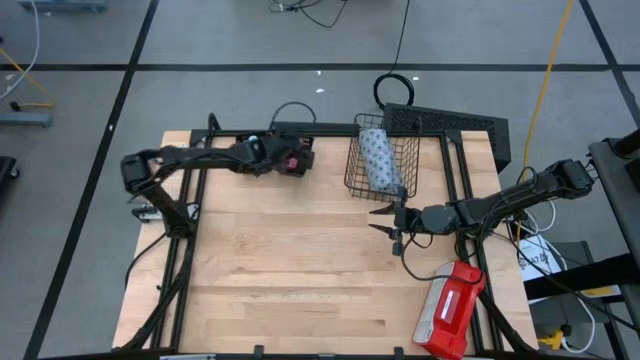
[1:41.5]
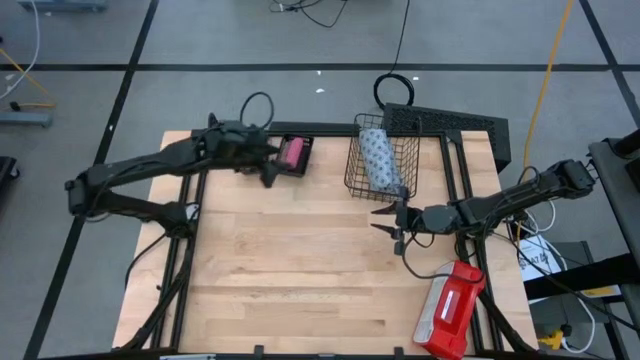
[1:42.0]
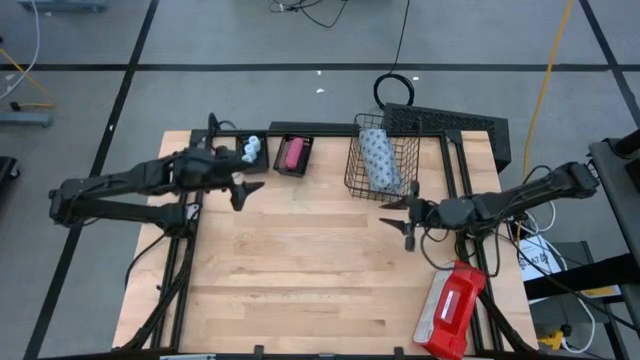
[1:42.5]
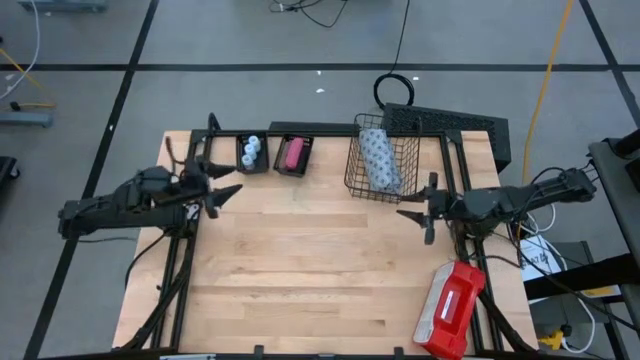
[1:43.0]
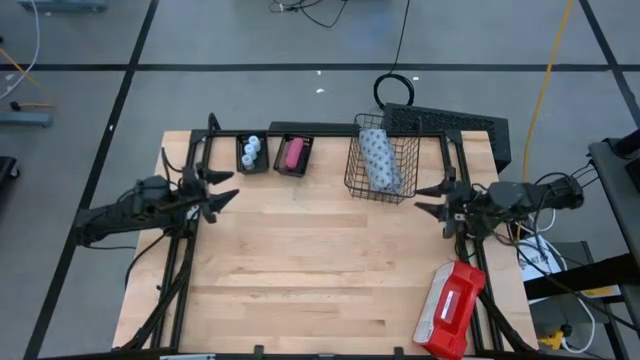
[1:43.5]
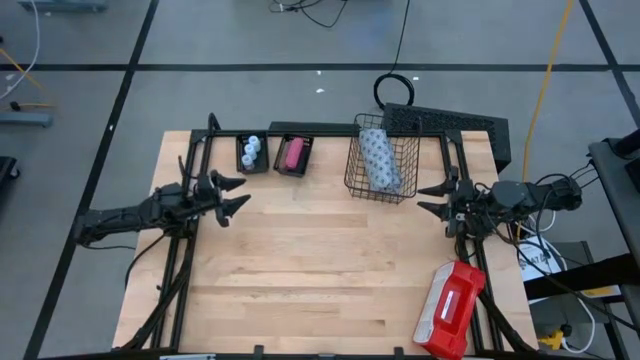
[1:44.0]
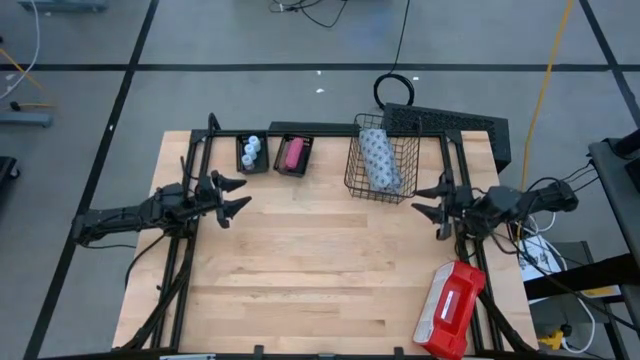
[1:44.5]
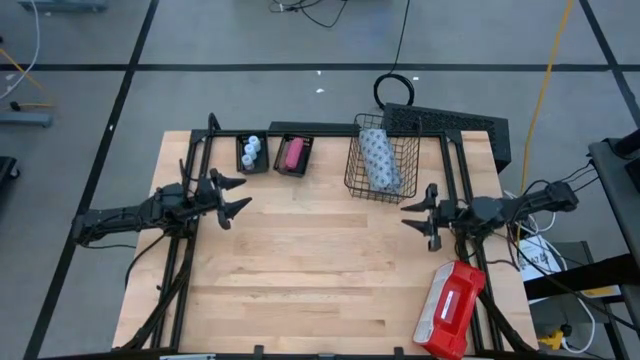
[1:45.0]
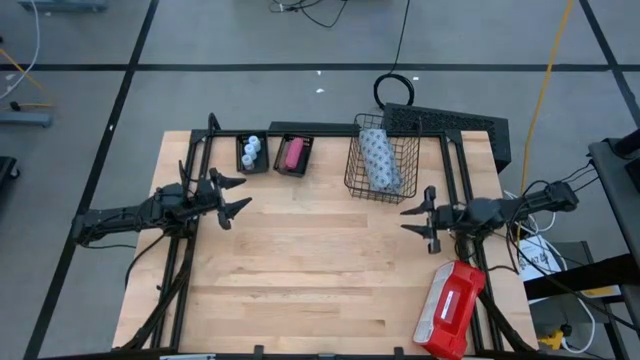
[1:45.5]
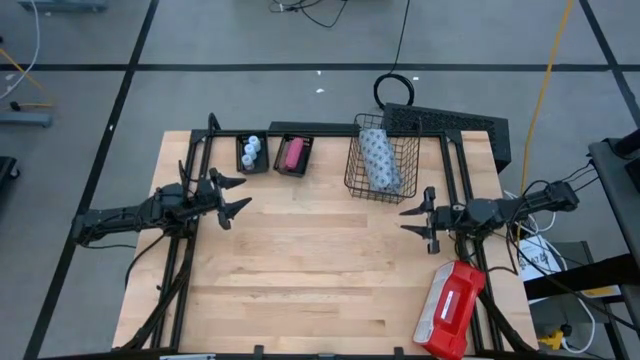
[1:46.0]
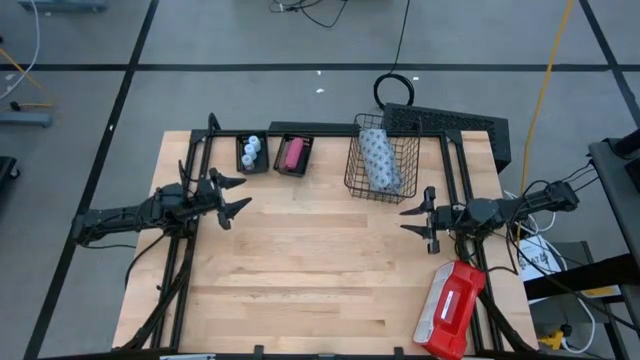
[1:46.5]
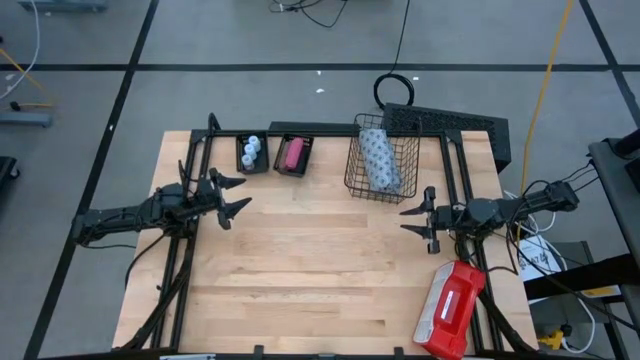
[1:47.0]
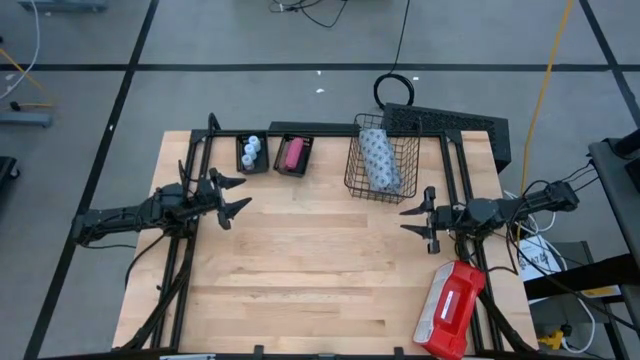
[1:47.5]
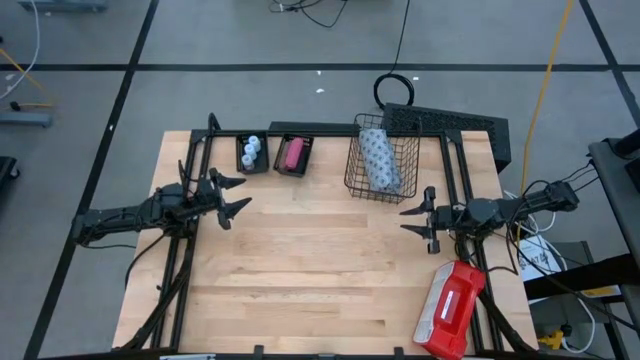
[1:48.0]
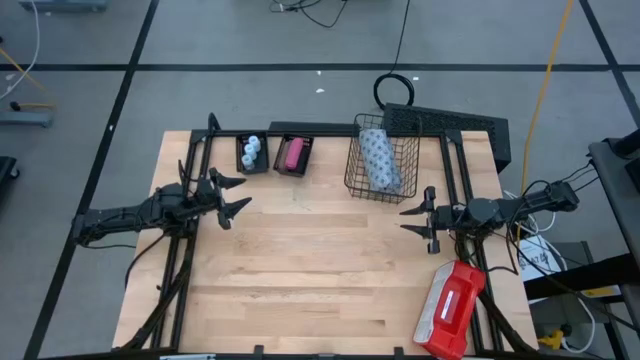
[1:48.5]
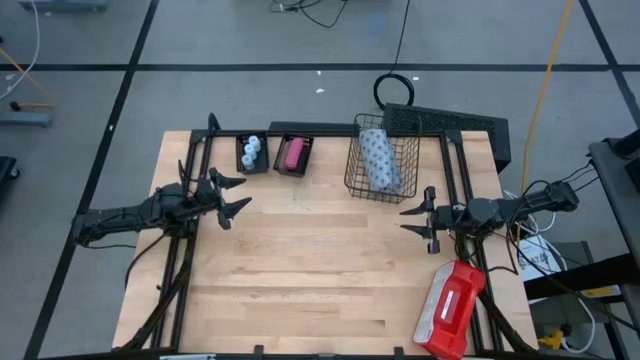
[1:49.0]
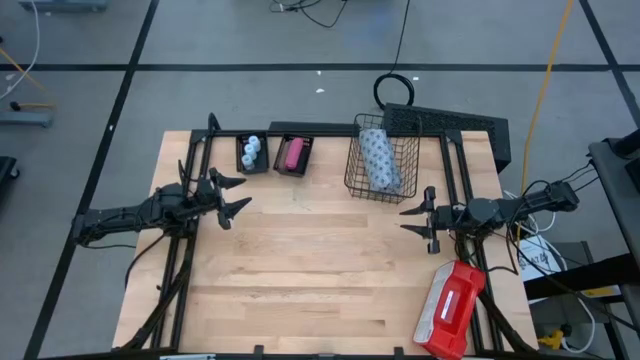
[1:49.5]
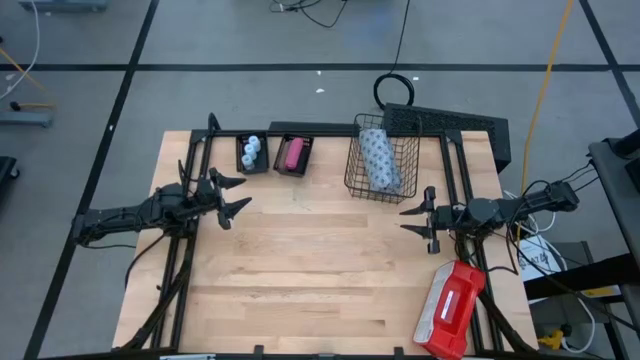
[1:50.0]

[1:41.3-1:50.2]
Task: Pick & place medical supplies in basket/bin
Return to Home Position

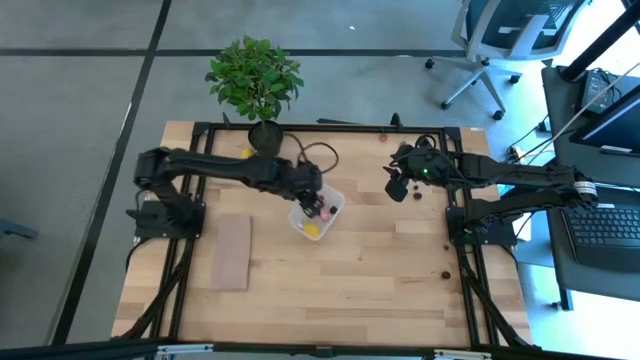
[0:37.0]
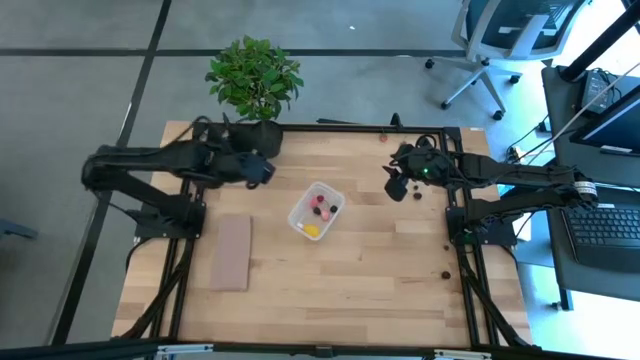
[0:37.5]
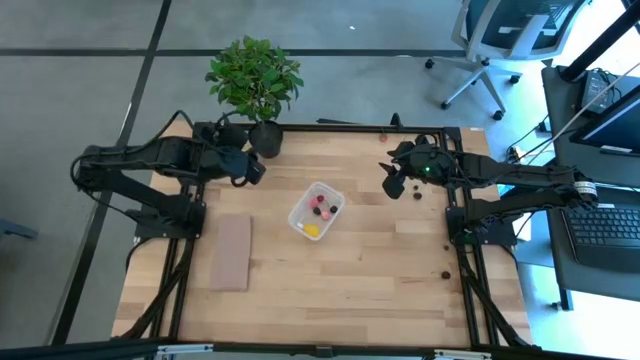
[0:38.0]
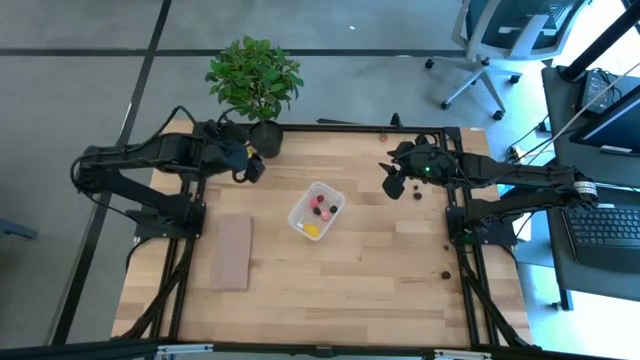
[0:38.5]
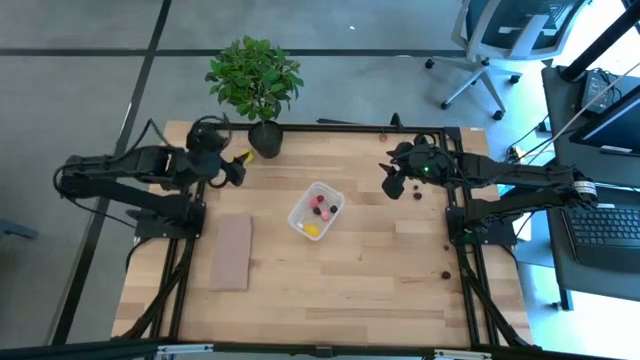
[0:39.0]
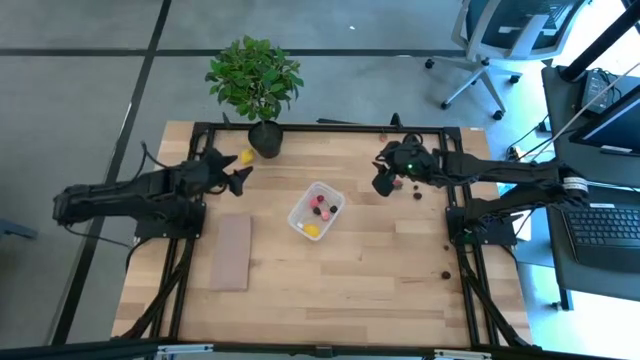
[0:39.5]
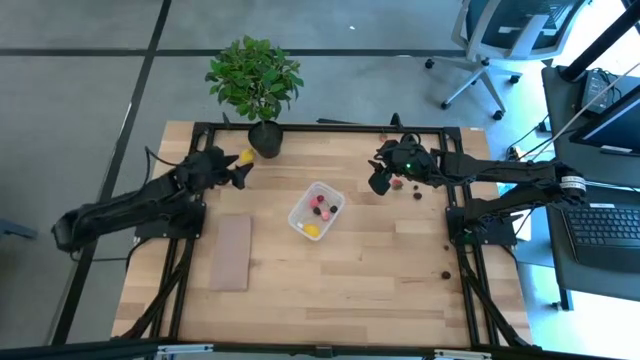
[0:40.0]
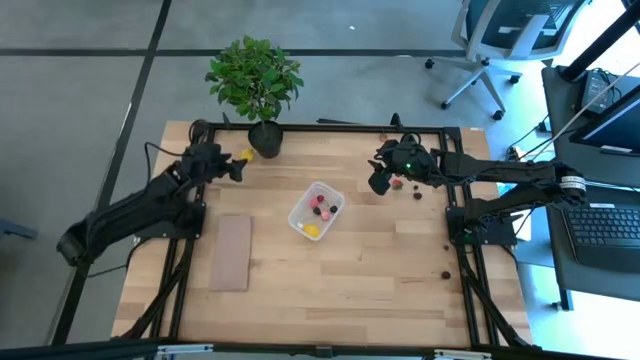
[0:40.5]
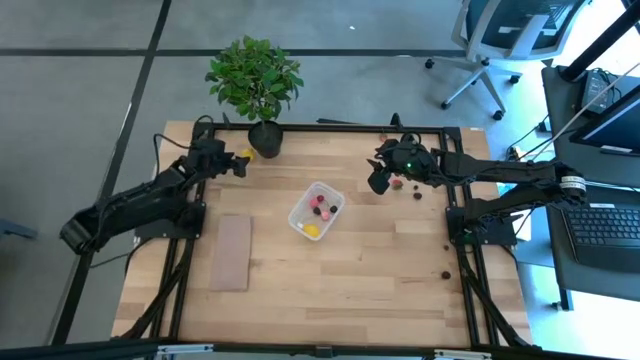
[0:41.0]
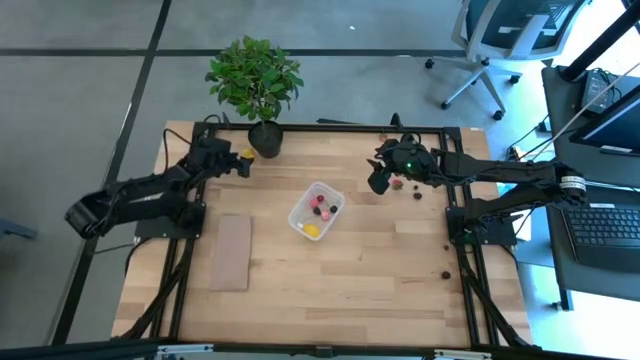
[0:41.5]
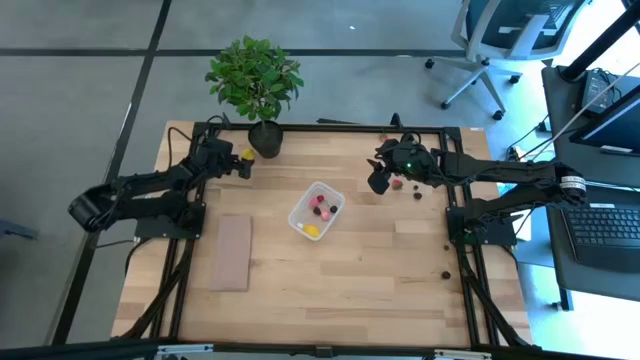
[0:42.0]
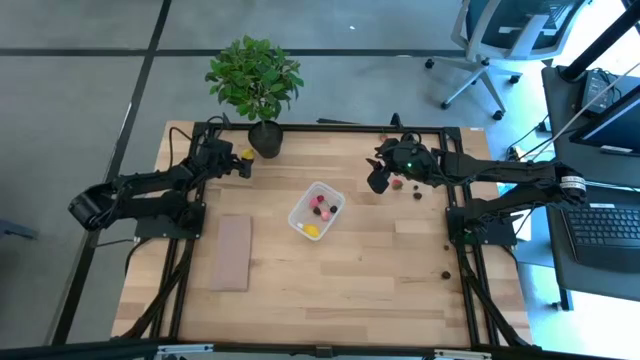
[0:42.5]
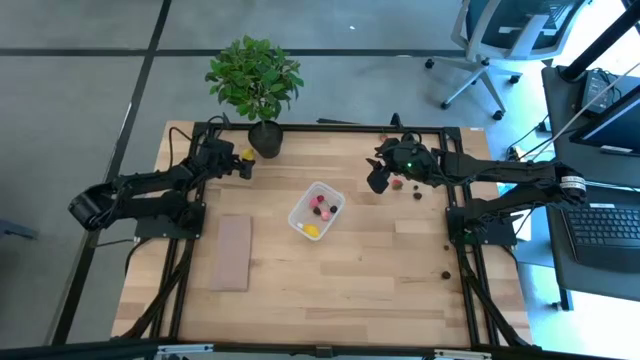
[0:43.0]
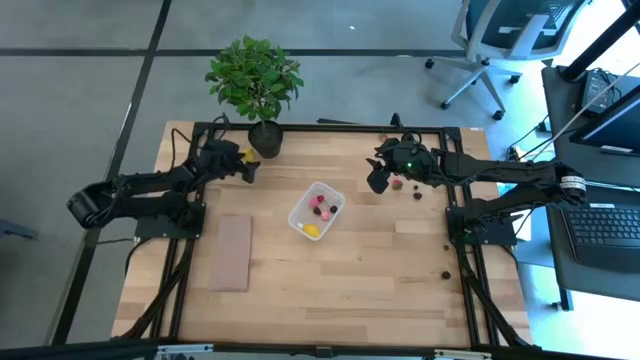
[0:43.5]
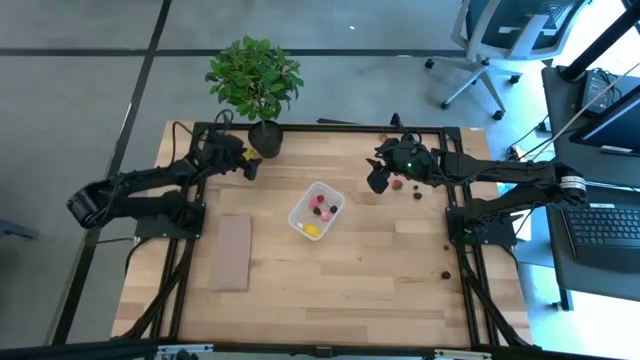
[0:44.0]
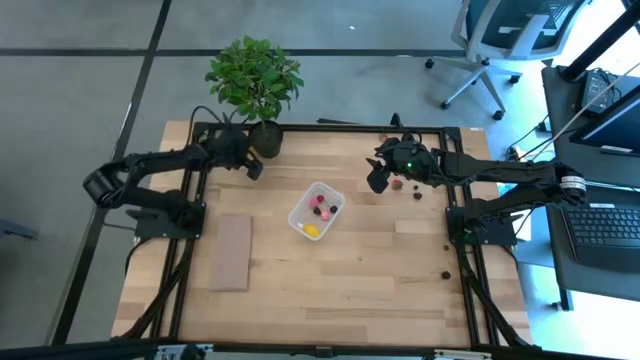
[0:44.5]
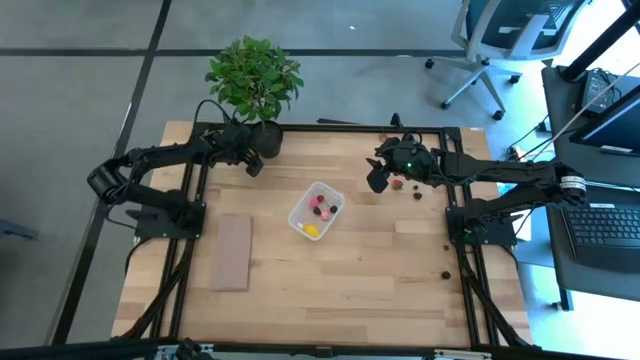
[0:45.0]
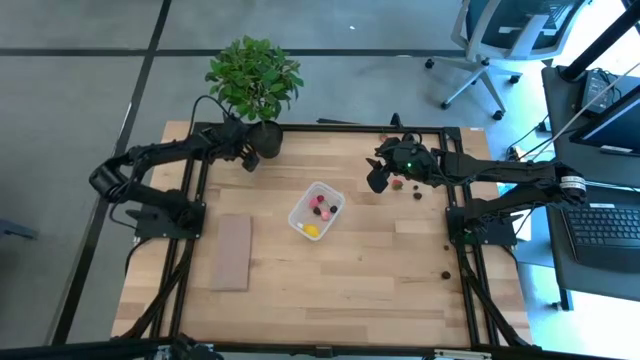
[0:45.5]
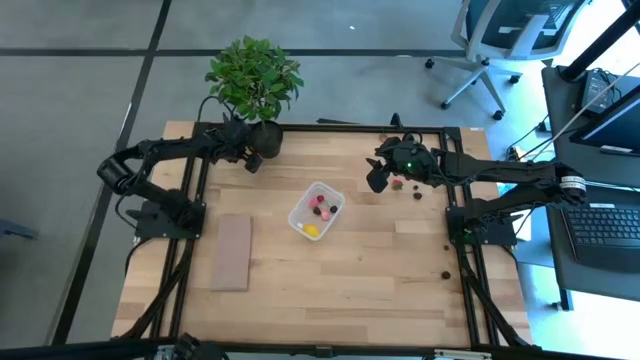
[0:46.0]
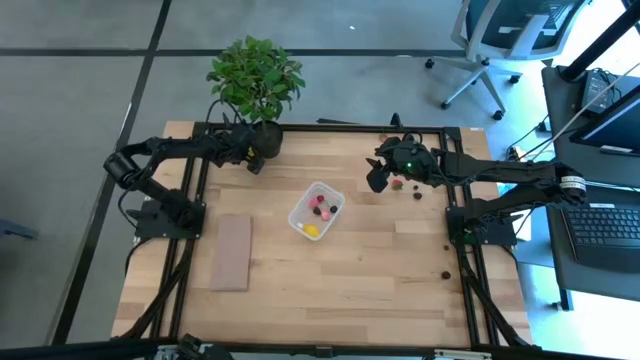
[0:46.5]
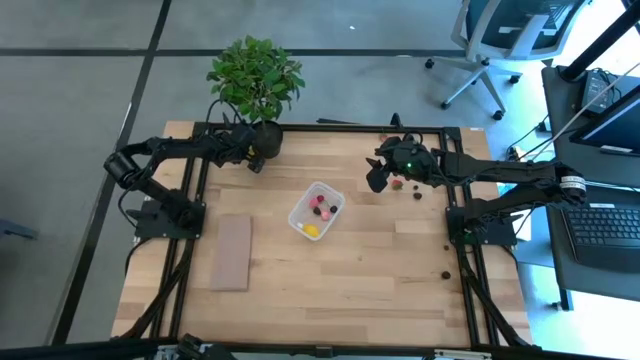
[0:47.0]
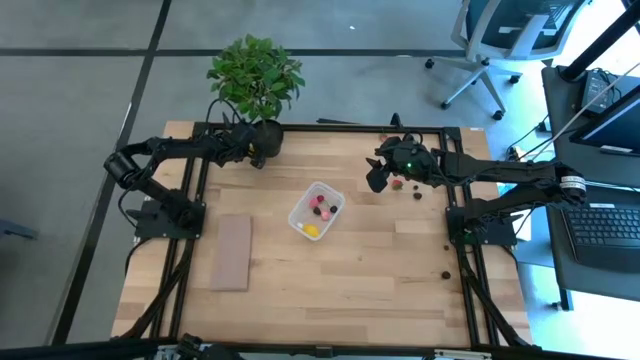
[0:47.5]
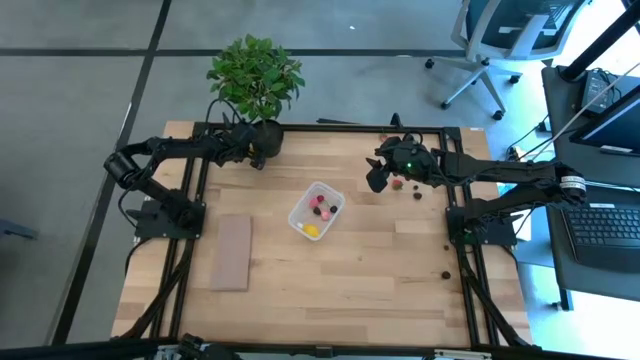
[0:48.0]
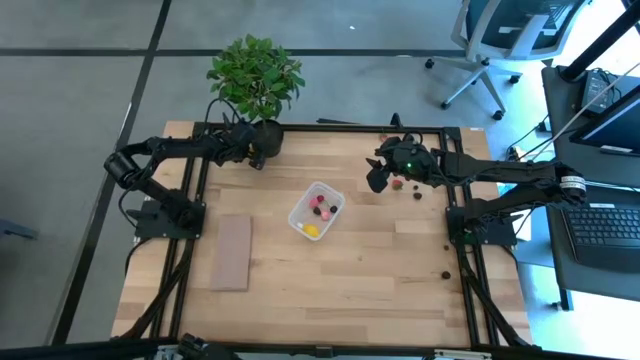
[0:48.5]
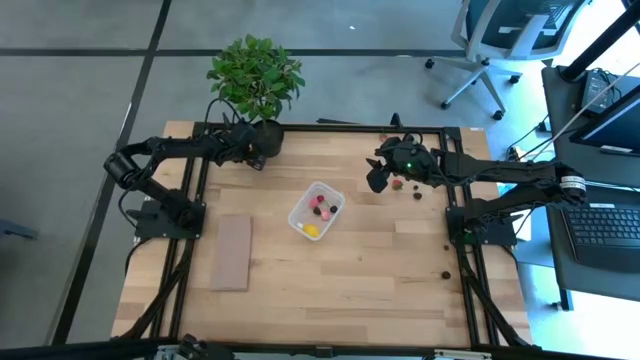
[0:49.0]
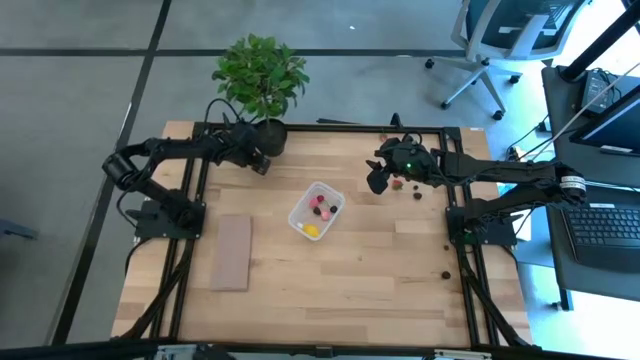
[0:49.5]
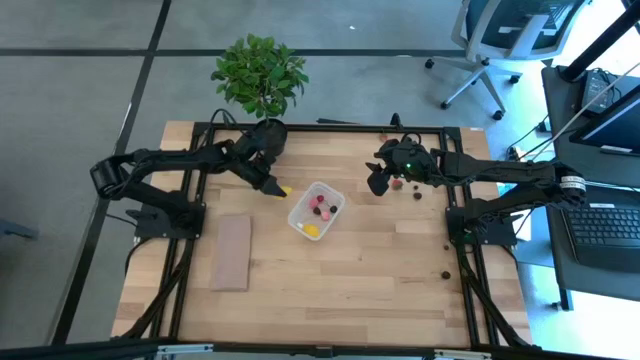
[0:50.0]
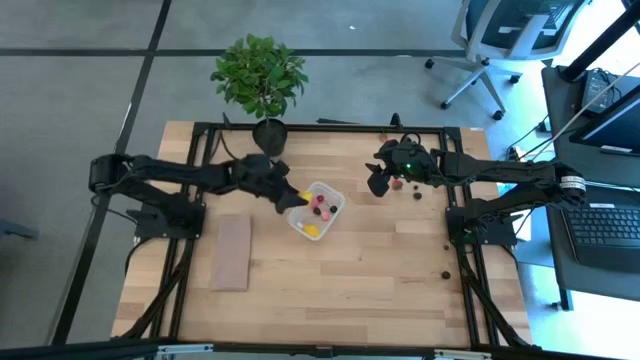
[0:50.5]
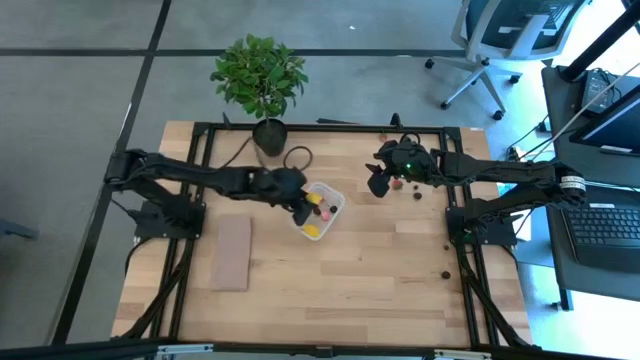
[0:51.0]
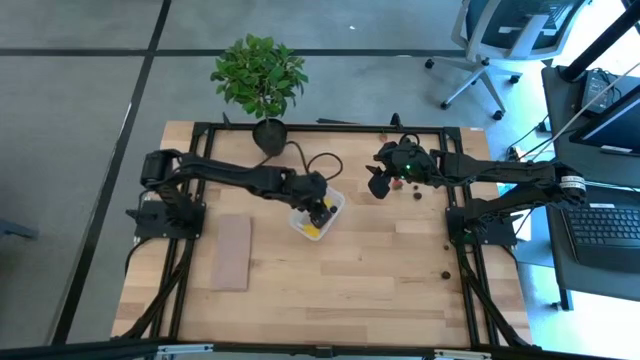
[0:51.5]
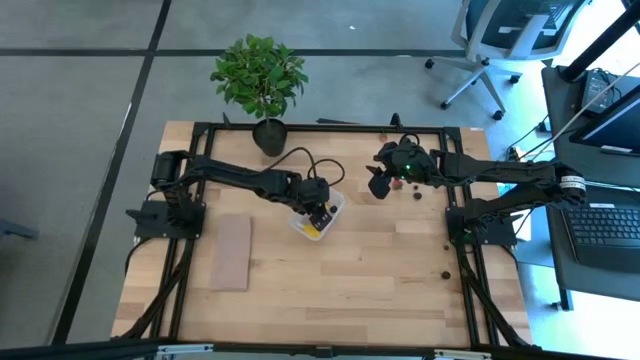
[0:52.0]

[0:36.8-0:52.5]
Task: Pick and placing Produce into tupperware
Put the lemon into the transparent bin
